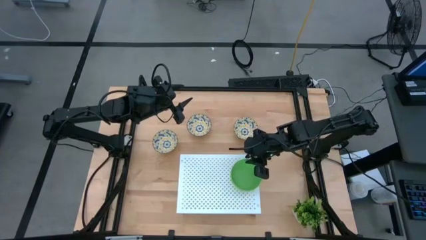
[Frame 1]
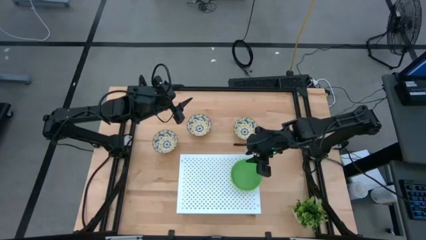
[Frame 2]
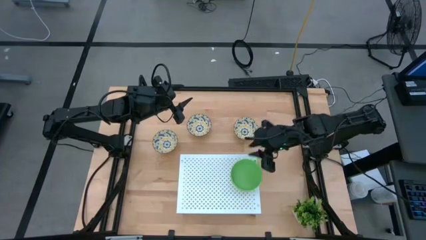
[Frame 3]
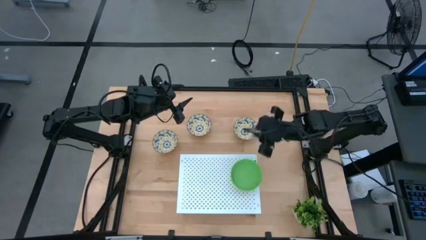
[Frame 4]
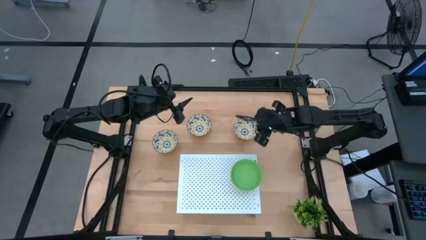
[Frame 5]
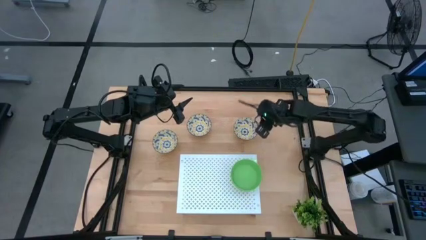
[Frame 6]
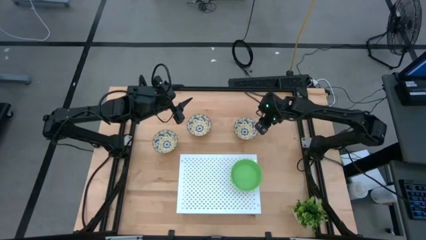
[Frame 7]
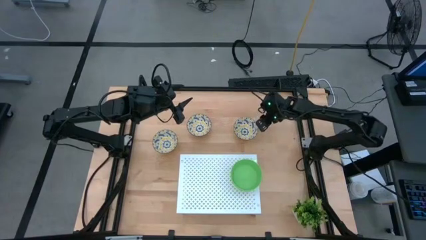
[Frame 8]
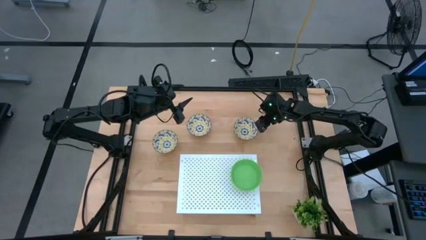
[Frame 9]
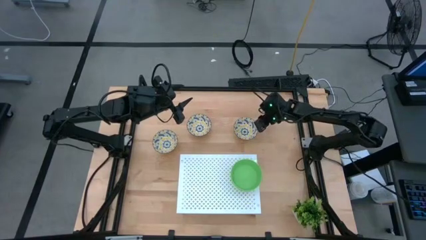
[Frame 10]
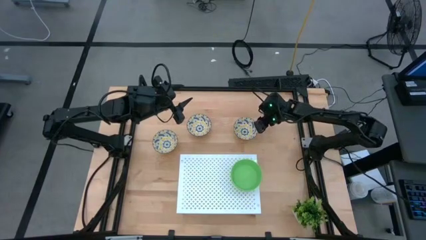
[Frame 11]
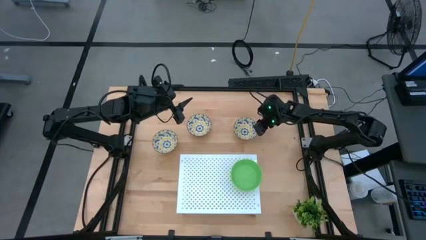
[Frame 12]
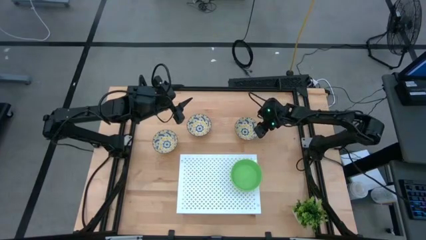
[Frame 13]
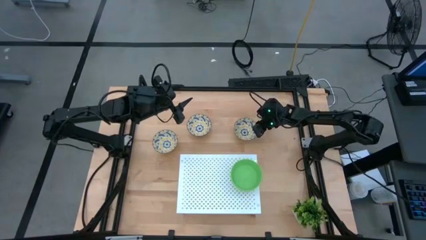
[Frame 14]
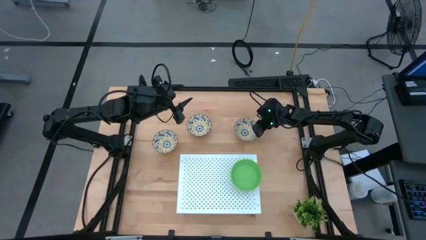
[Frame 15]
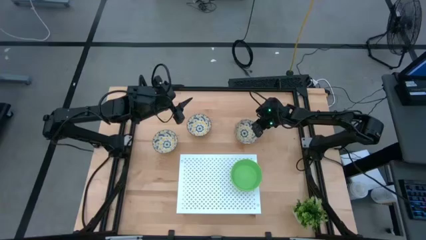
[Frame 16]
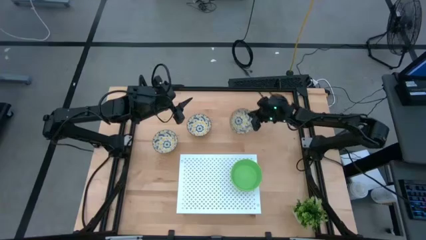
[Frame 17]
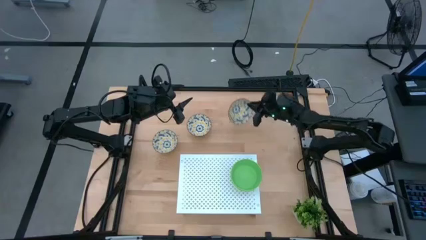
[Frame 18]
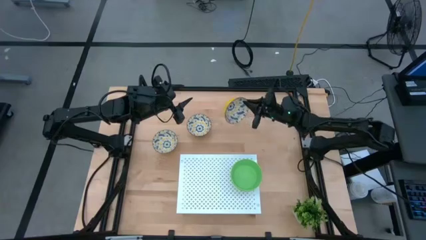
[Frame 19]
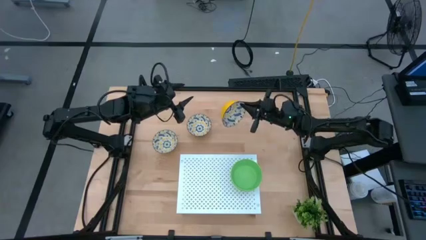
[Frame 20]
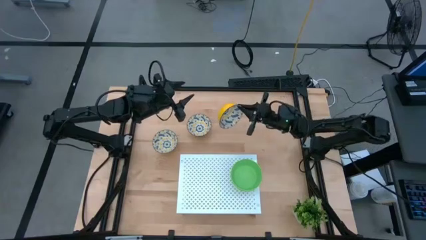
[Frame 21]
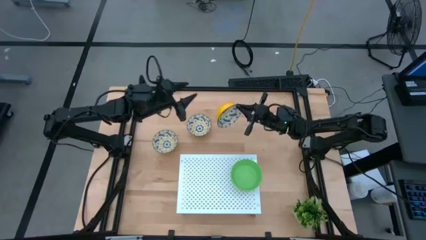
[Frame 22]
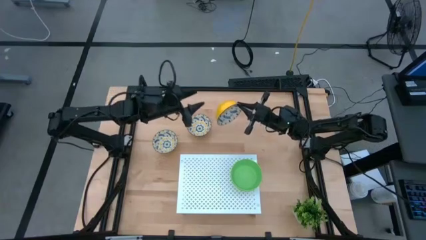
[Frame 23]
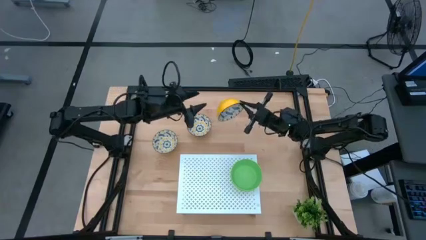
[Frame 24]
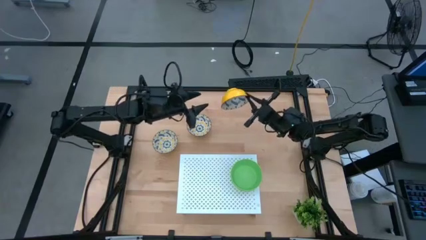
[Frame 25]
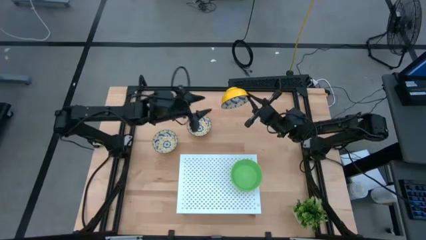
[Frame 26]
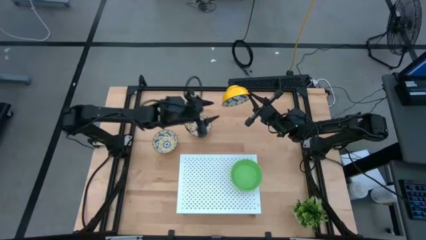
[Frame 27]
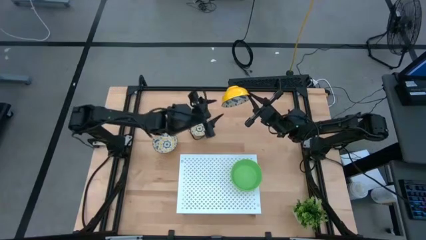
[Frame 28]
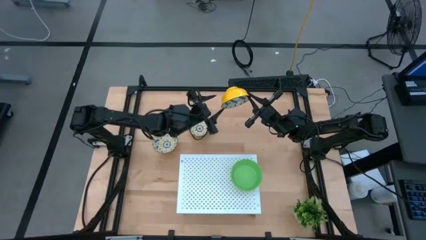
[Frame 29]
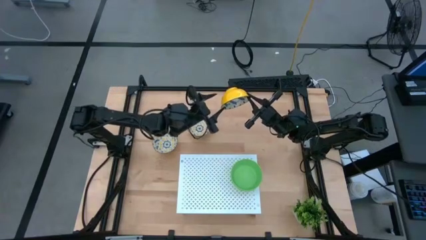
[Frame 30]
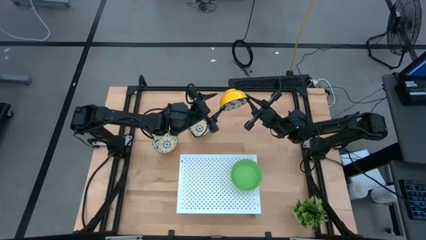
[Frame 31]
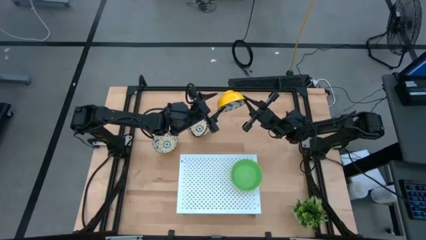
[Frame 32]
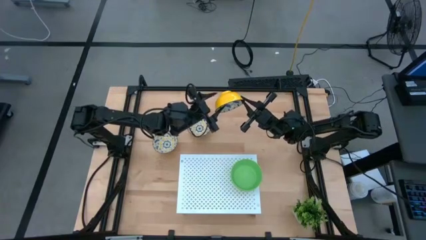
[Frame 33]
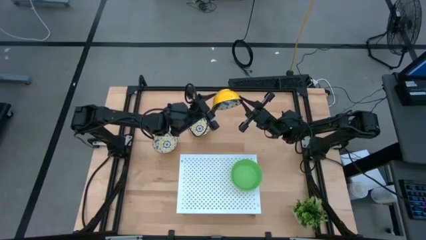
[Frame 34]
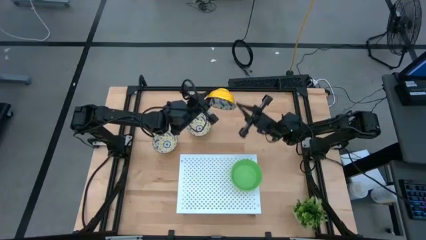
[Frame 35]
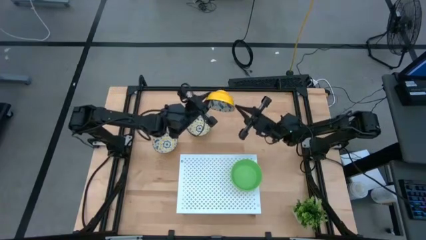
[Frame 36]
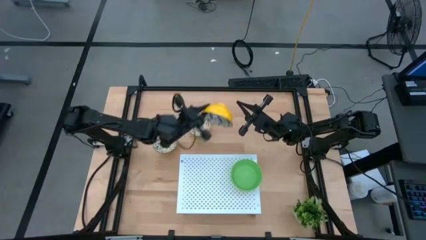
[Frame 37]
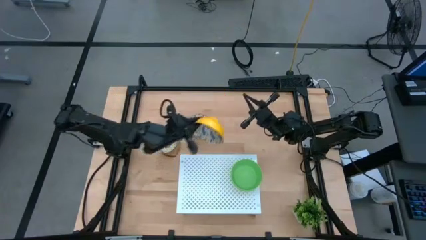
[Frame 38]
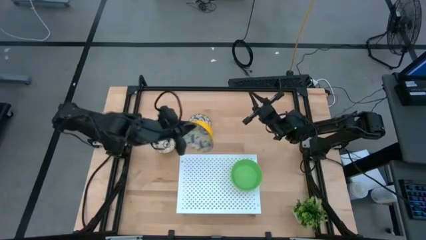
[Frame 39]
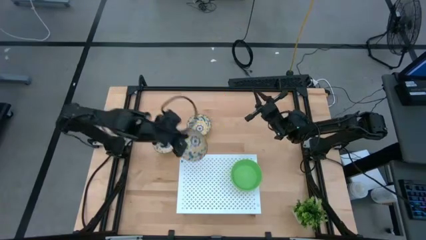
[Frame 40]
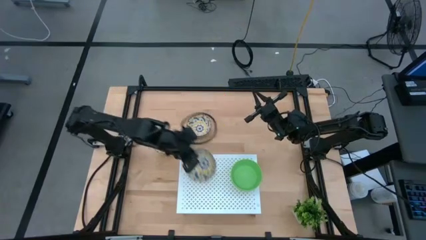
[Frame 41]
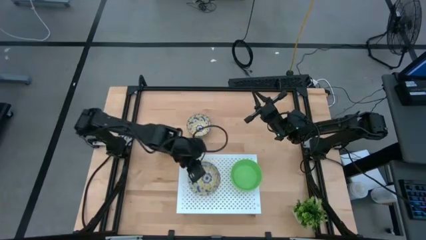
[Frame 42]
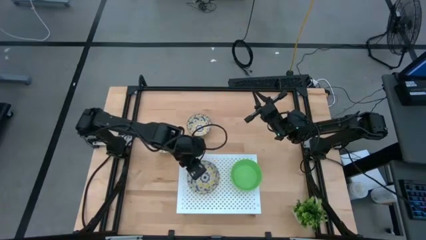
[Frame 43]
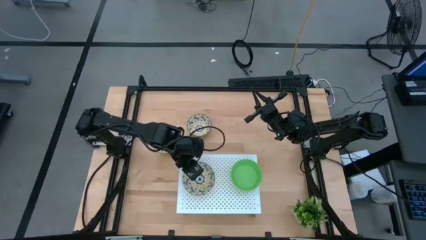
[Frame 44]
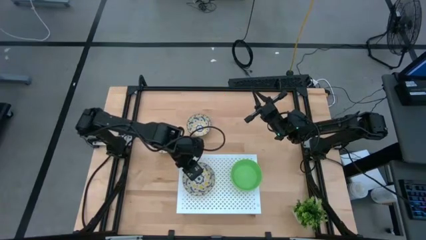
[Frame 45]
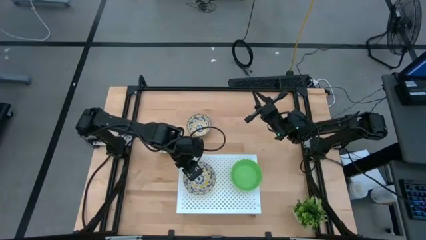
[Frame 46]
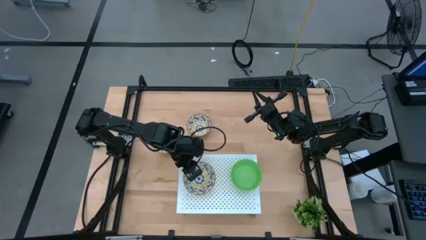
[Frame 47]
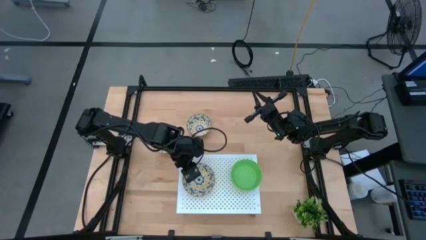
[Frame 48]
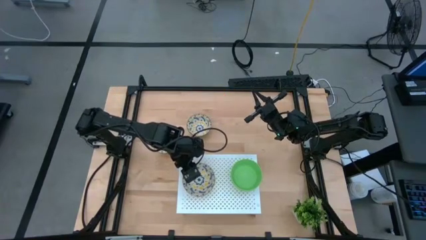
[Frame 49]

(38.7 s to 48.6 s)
Task: Pick & Place Mini bowls
Put the right white bowl on the shelf

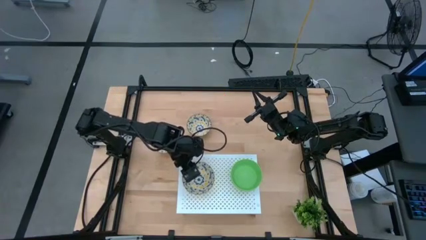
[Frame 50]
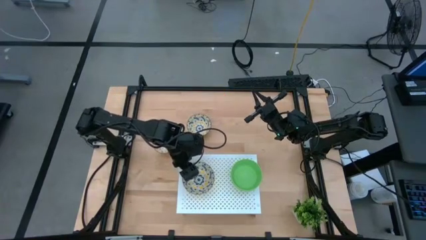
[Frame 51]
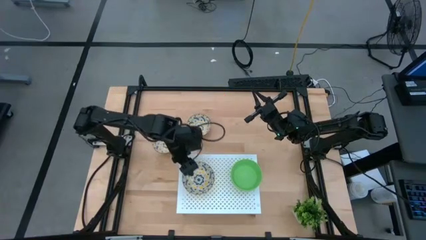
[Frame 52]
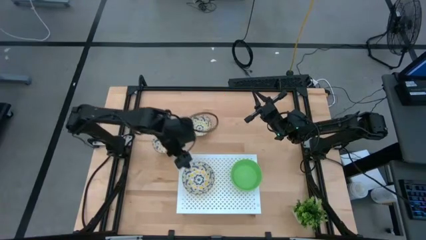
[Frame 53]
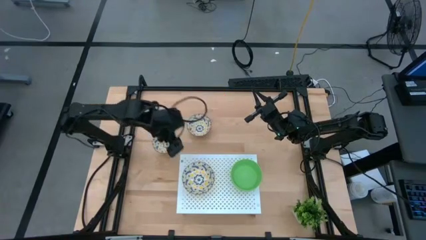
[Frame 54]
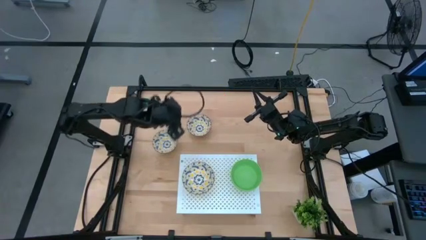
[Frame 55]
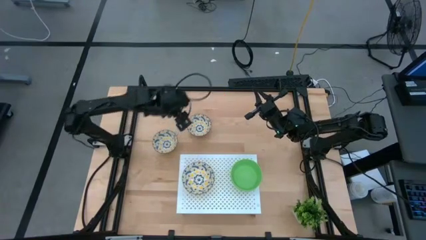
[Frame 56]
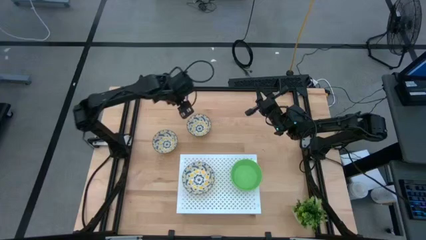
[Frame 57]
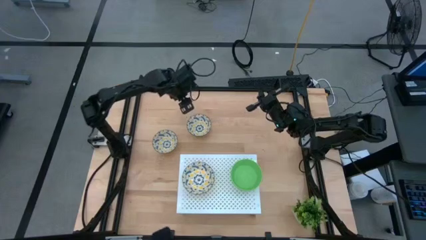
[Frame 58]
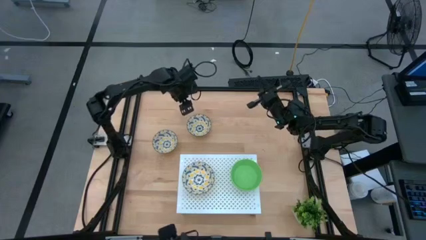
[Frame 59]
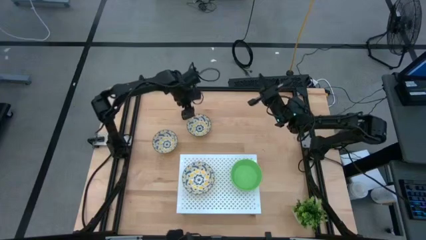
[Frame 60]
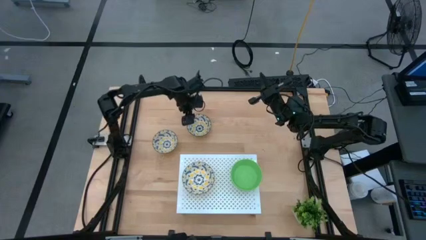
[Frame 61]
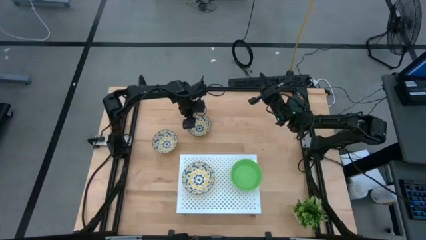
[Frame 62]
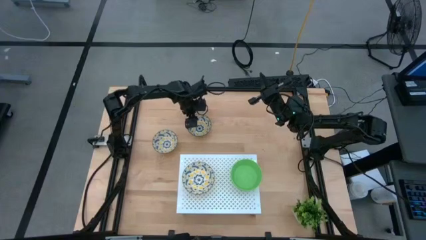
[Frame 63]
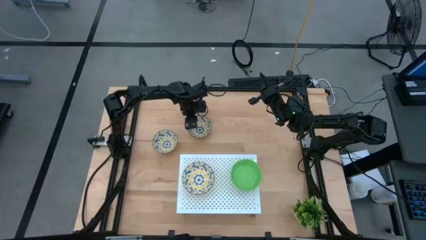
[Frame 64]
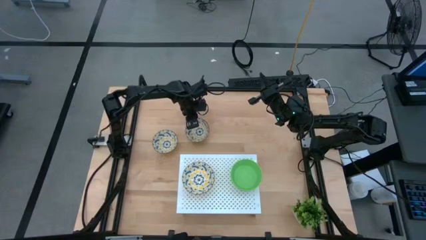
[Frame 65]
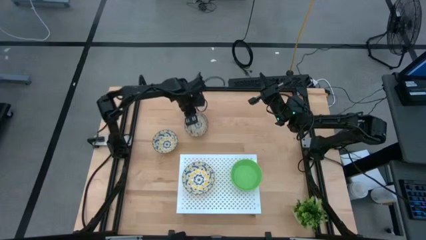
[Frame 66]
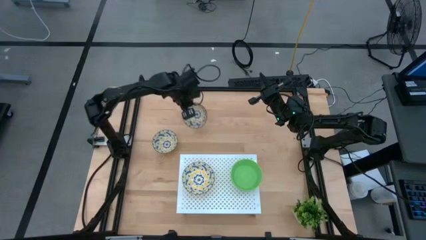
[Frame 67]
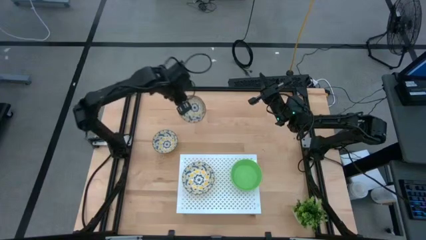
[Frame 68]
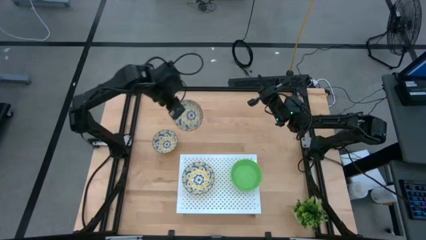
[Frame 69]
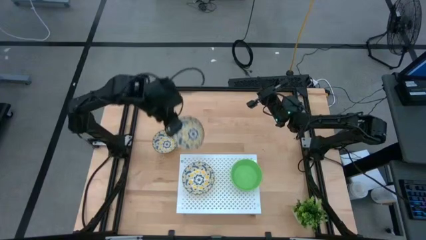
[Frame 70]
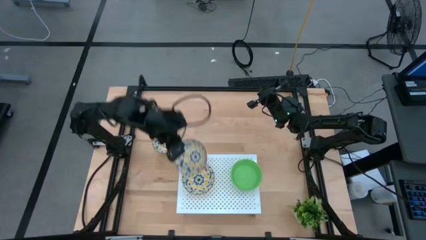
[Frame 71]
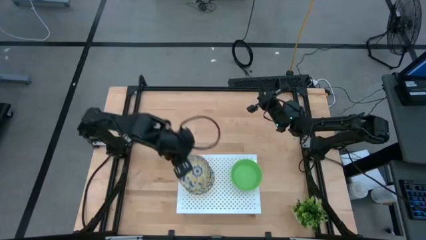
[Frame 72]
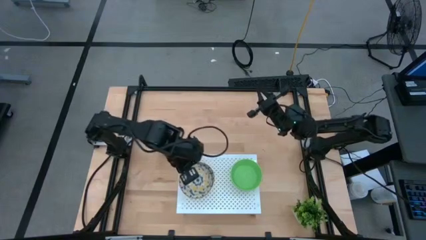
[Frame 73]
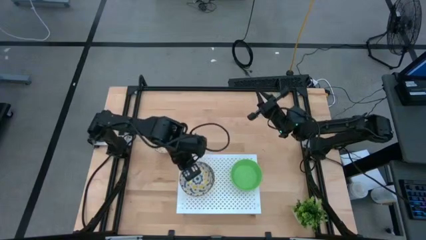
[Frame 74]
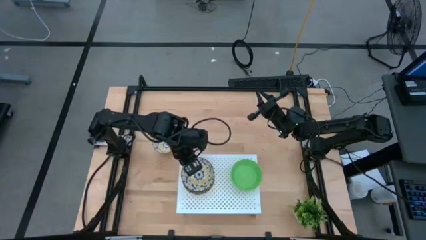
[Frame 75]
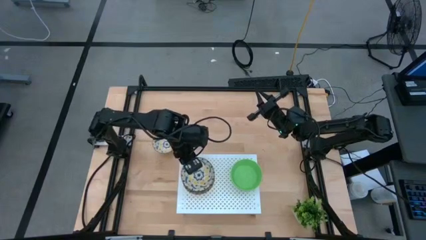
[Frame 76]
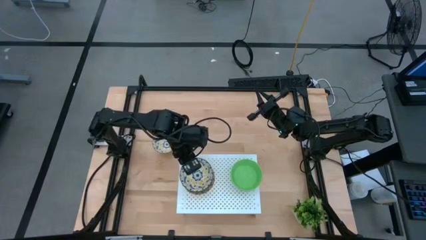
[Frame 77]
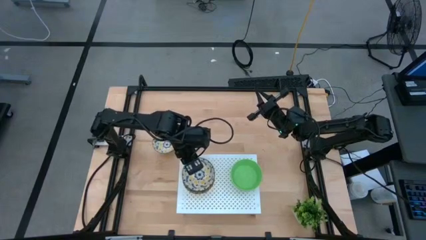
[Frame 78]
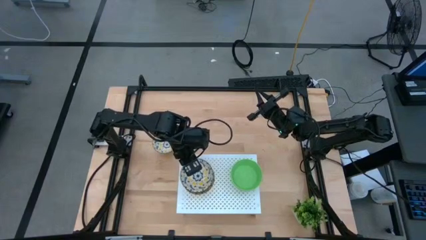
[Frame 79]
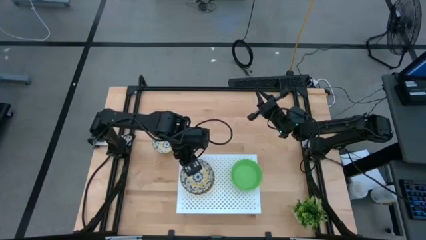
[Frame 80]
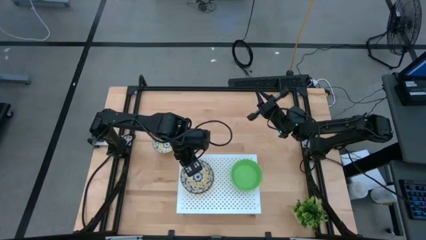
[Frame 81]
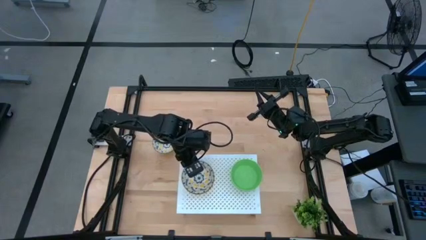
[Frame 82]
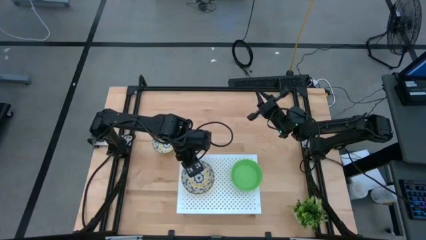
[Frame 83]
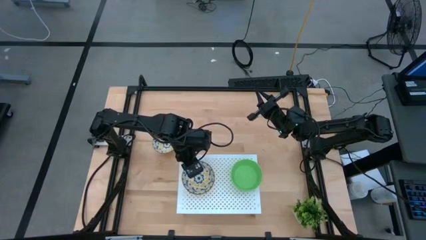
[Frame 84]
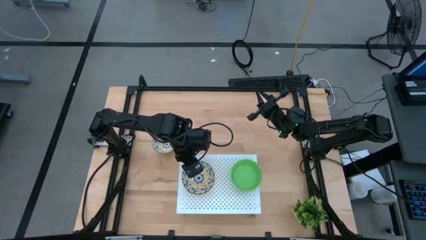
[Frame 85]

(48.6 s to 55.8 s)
Stack the right white bowl on the top of the white bowl on the shelf
